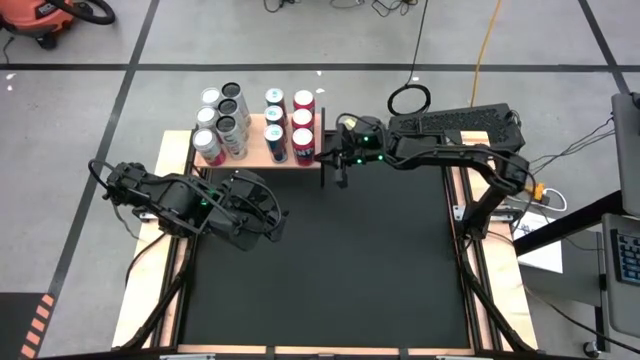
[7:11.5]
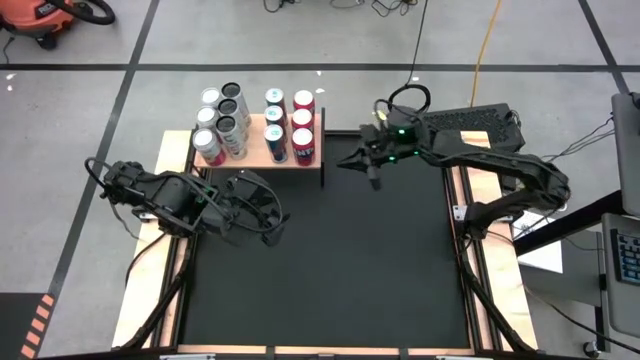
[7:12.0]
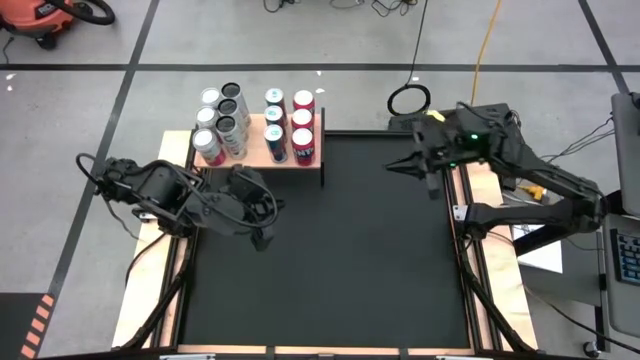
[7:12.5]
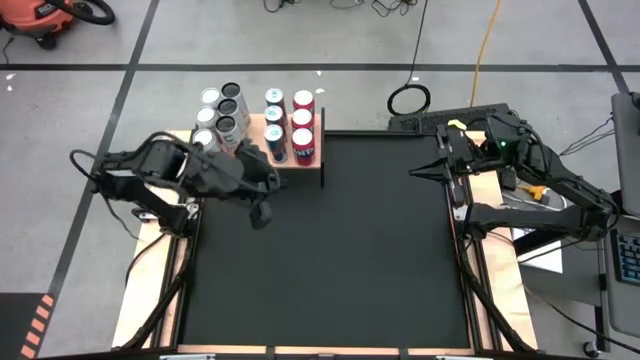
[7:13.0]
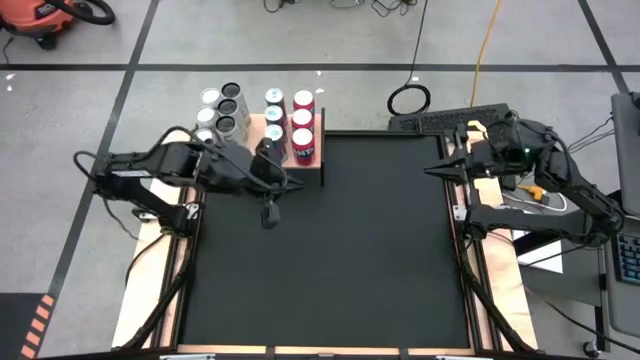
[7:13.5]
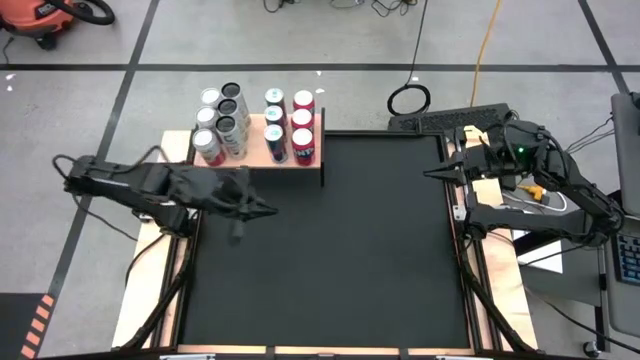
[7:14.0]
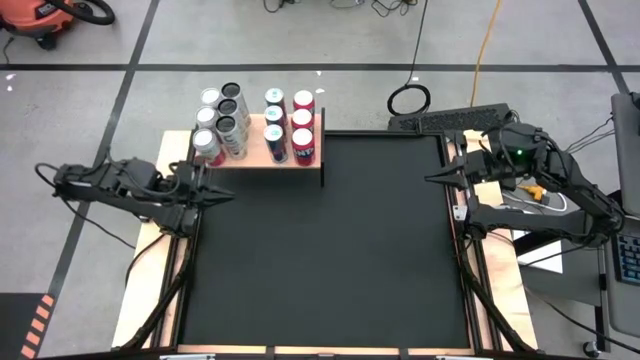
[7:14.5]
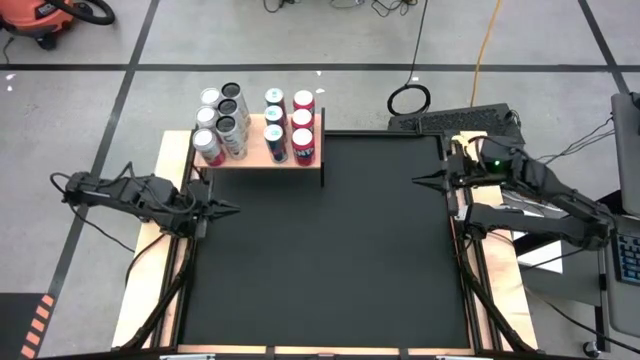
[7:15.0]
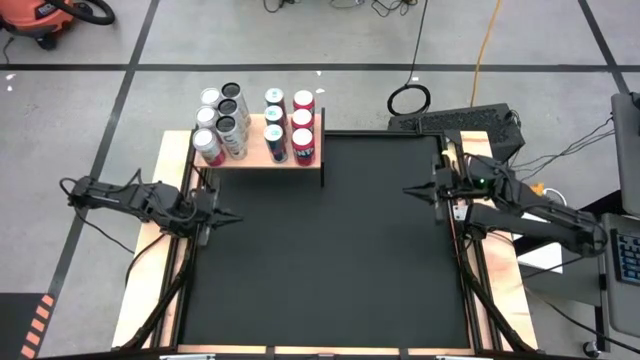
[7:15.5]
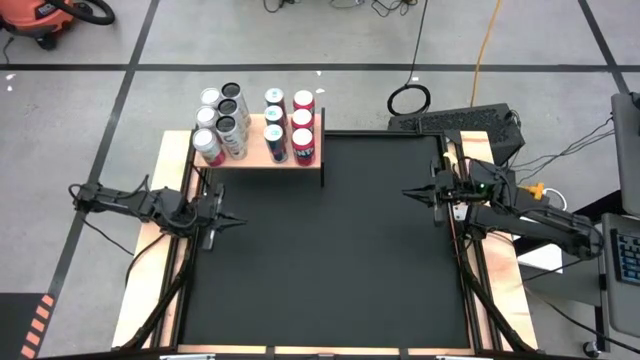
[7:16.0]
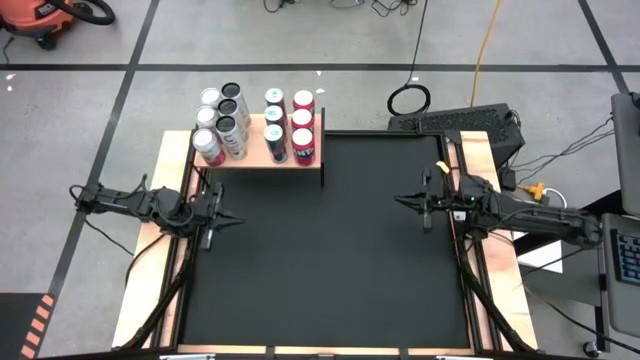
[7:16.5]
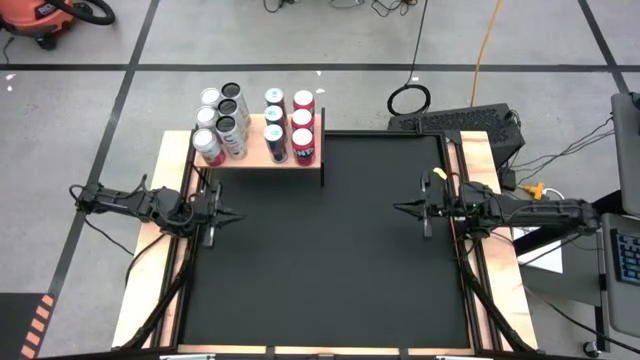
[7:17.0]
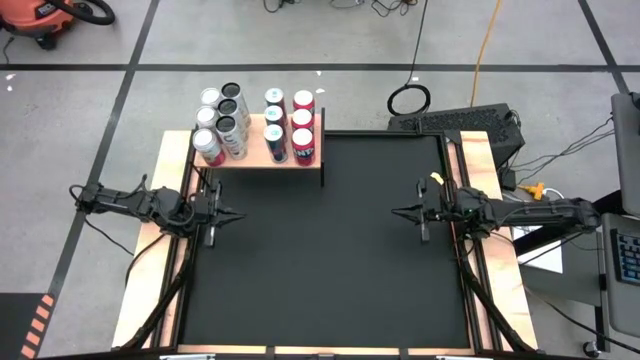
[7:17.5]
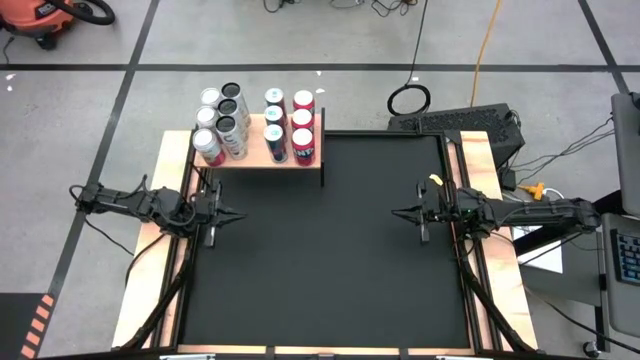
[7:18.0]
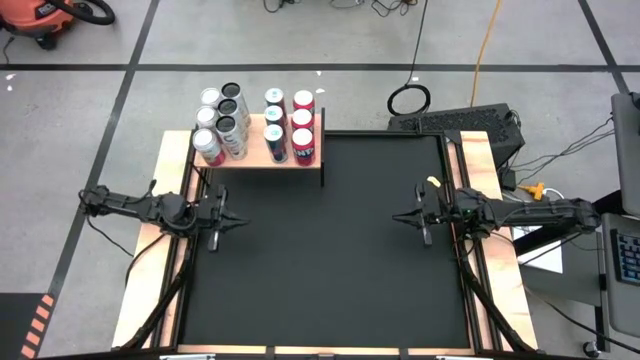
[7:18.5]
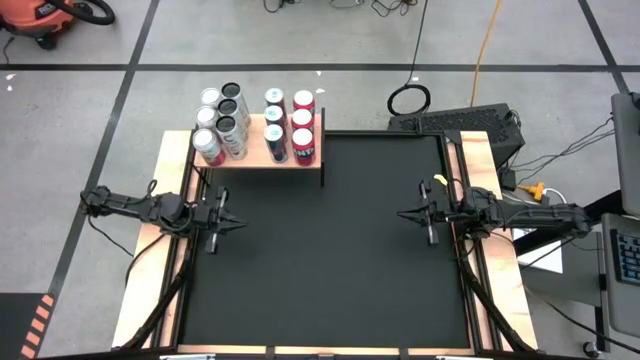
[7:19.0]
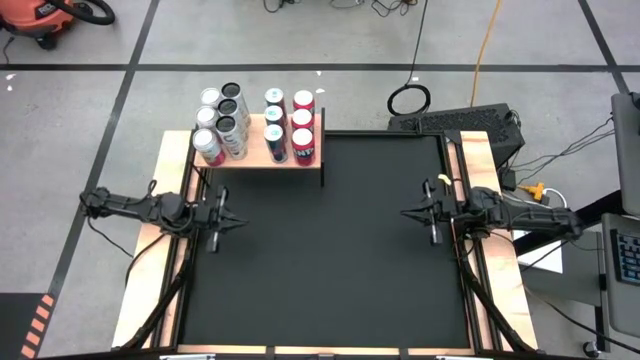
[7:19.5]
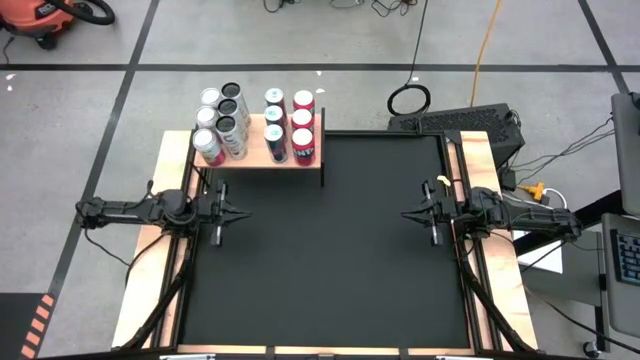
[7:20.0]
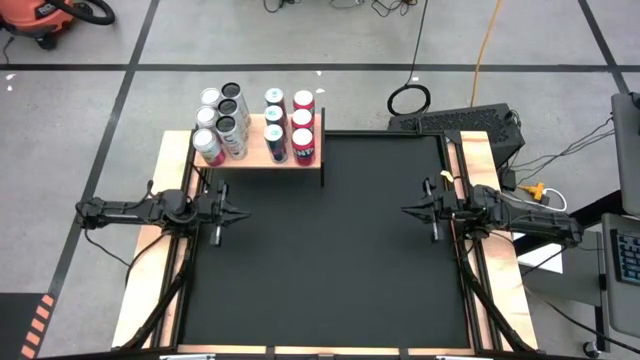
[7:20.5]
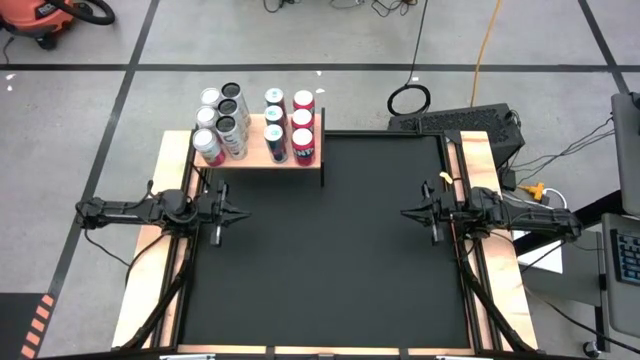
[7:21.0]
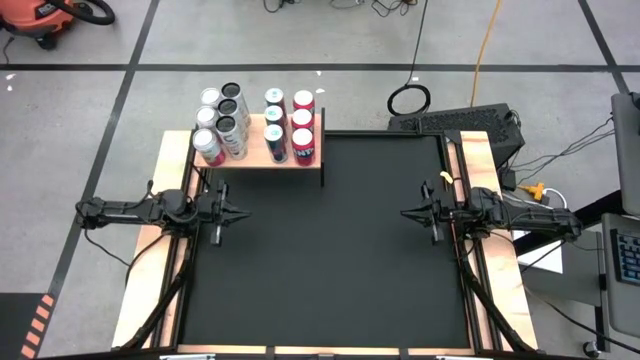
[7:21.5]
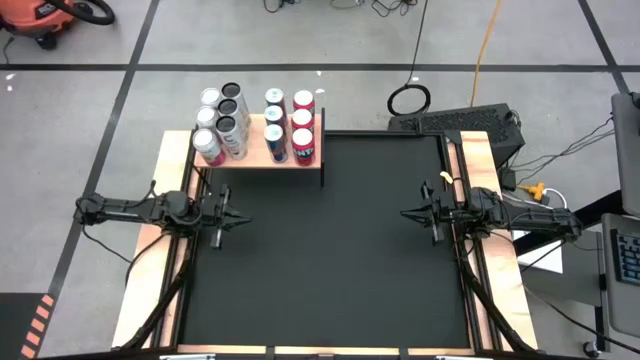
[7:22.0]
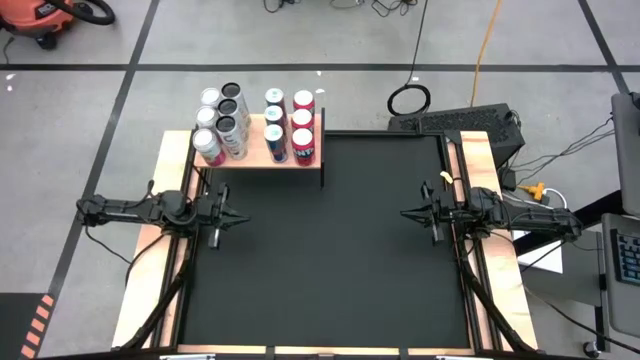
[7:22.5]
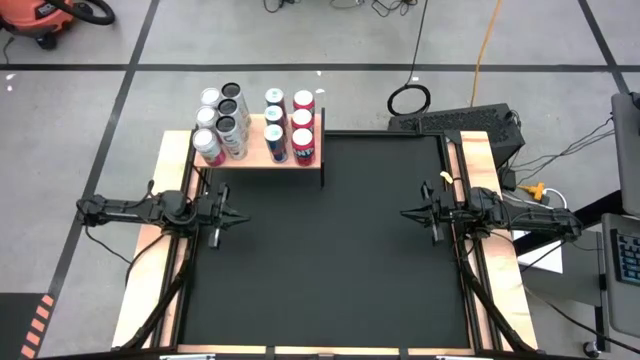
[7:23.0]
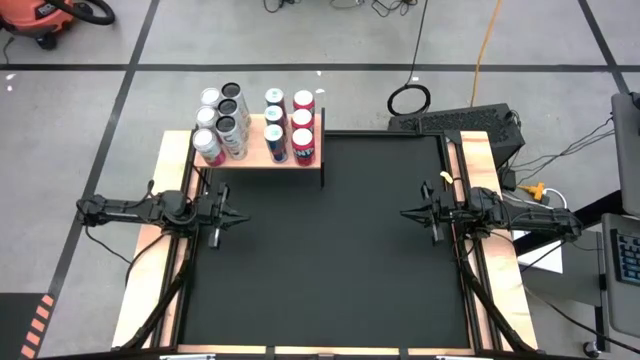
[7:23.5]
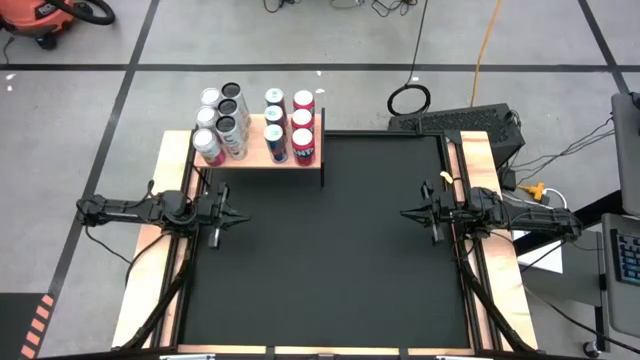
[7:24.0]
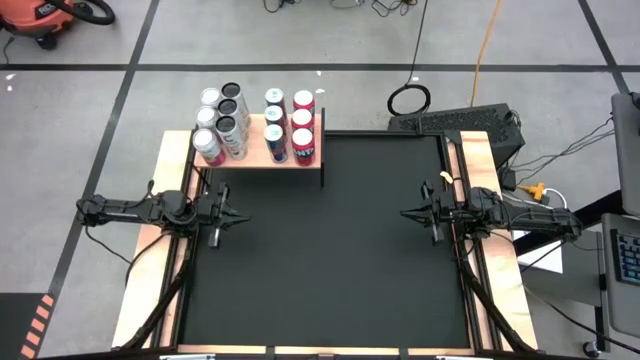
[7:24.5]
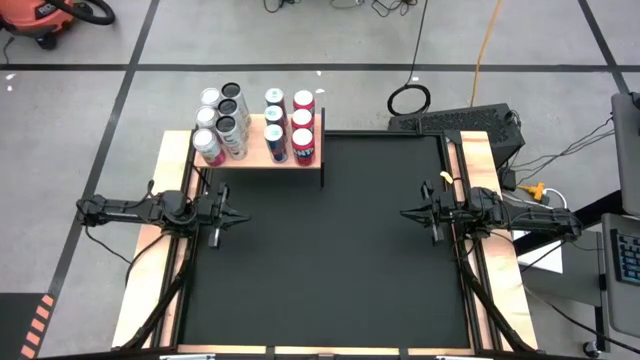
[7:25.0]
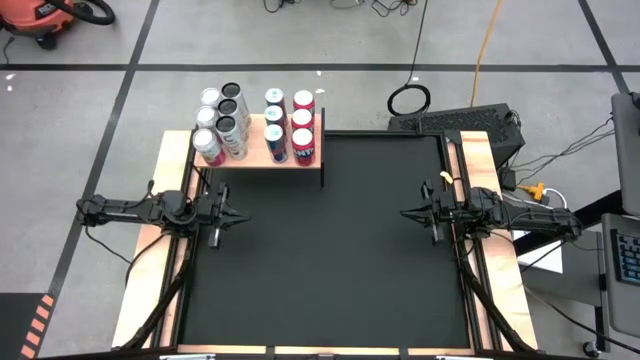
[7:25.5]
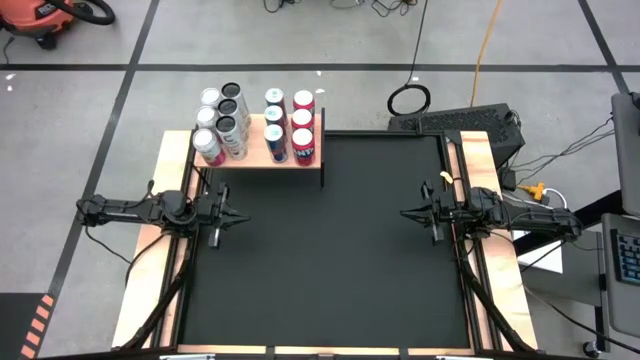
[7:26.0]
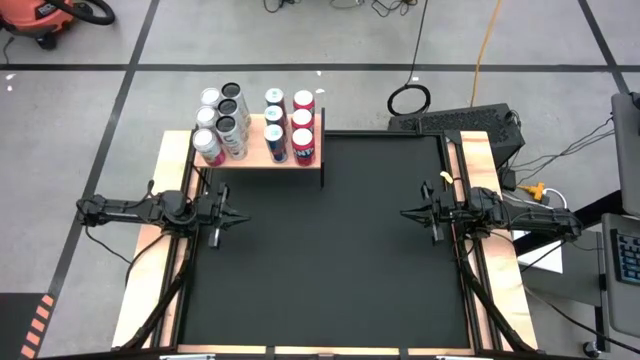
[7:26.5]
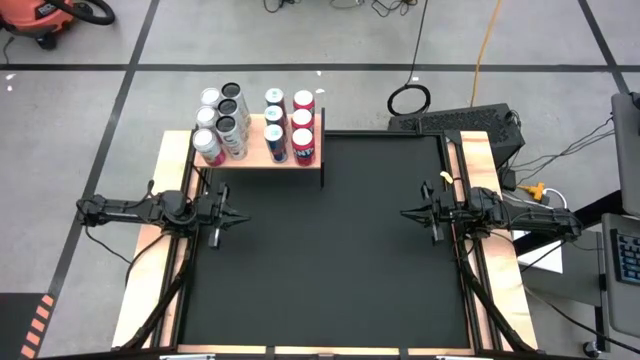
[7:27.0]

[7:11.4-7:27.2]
Task: Place canned beverage on shelf
Return to Home Position

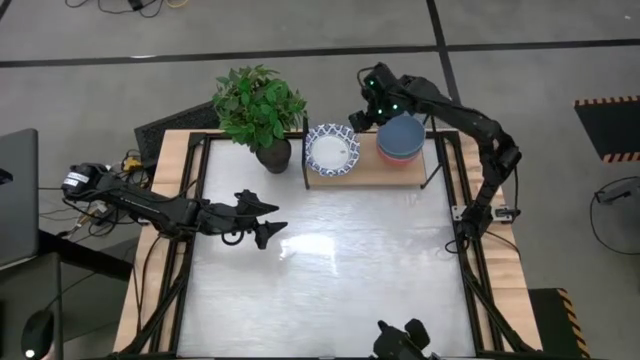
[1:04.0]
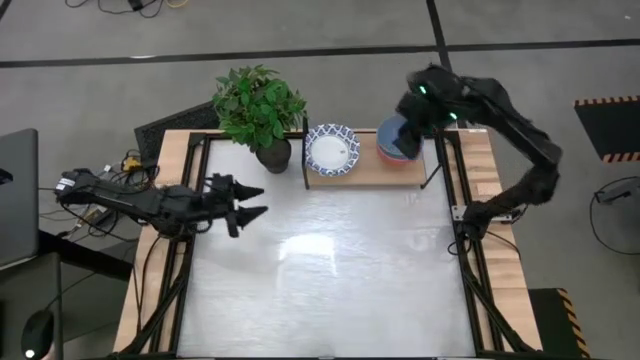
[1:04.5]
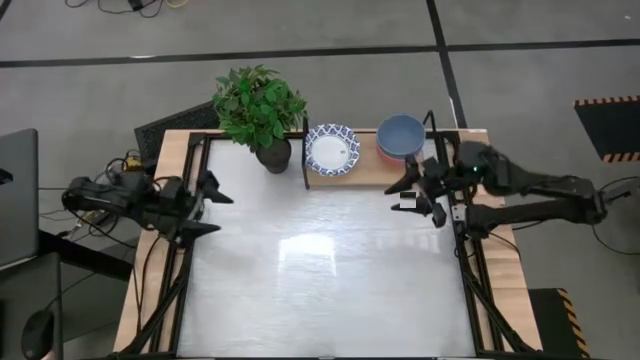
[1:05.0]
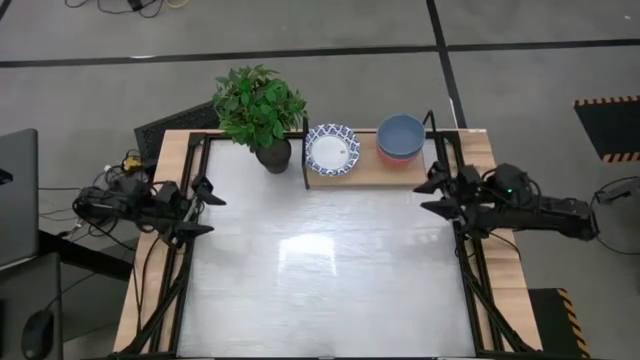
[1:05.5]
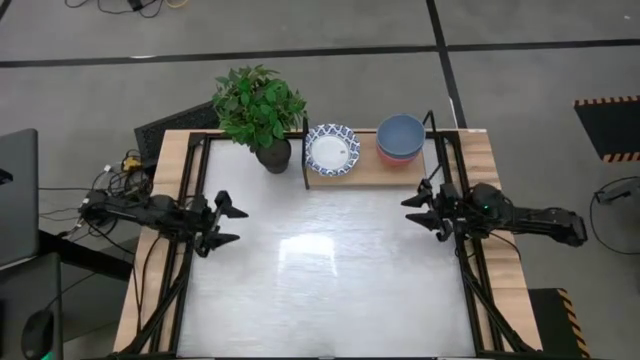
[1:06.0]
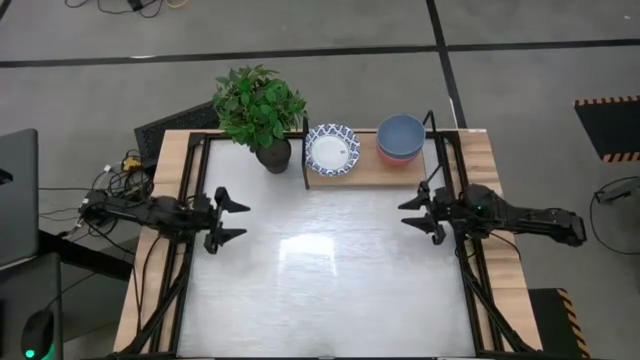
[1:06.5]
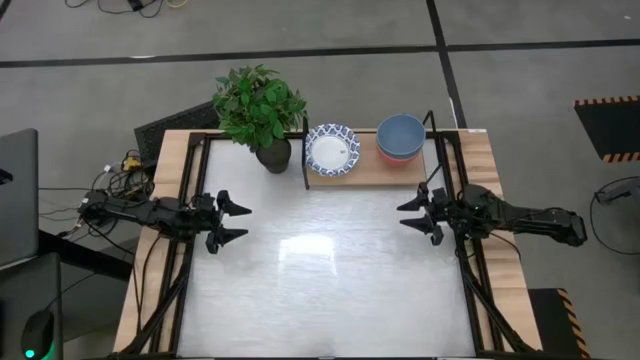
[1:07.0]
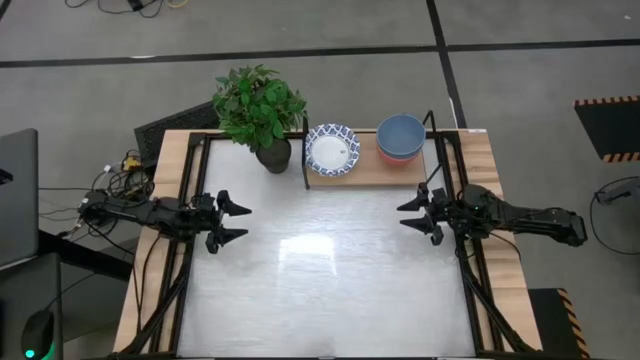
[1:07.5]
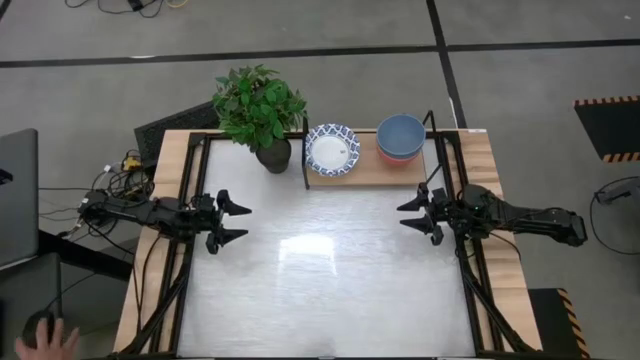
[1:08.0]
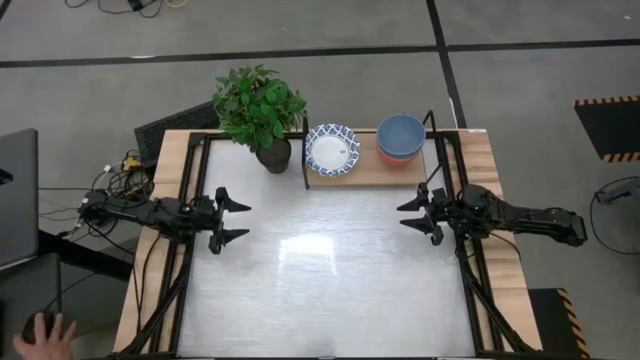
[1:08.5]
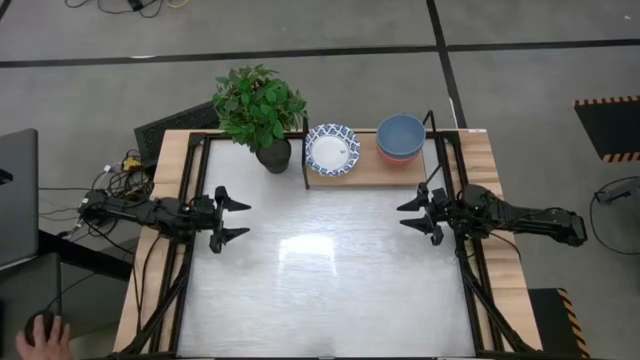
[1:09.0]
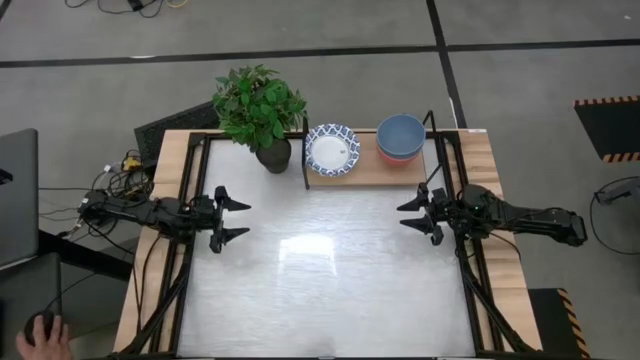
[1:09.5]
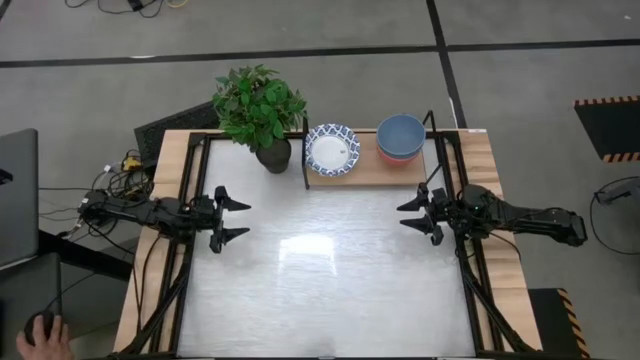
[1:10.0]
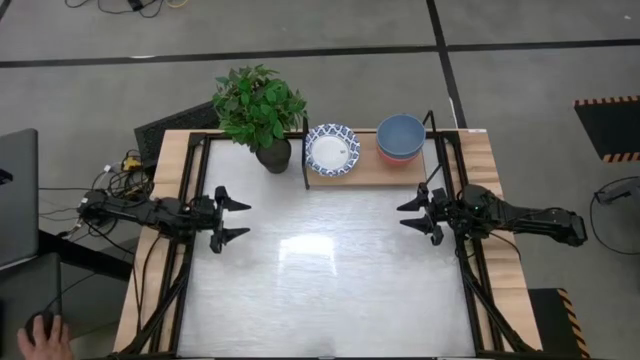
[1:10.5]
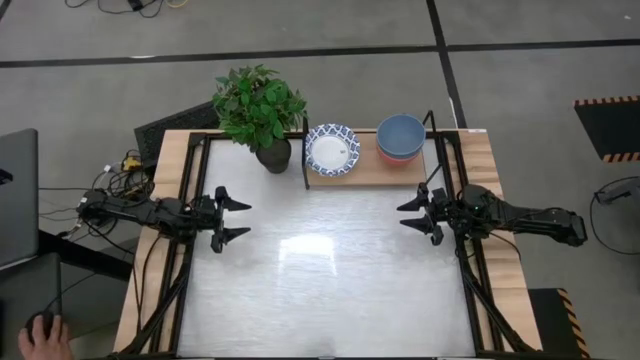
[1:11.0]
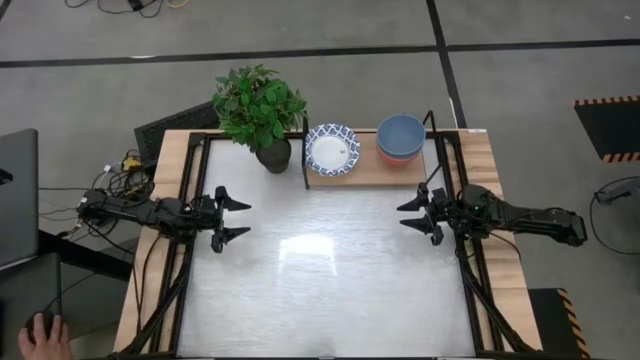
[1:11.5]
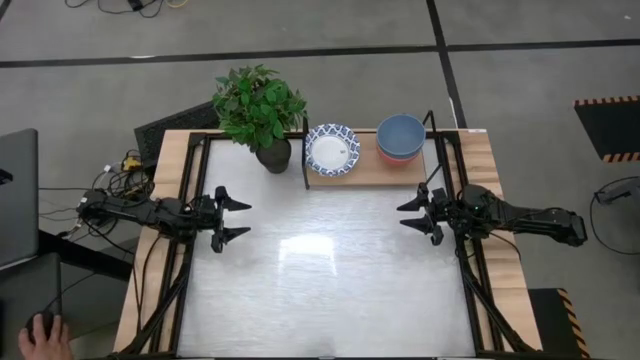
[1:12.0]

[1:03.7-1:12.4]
Task: Place and stack bowls onto a shelf
Return to Home Position
